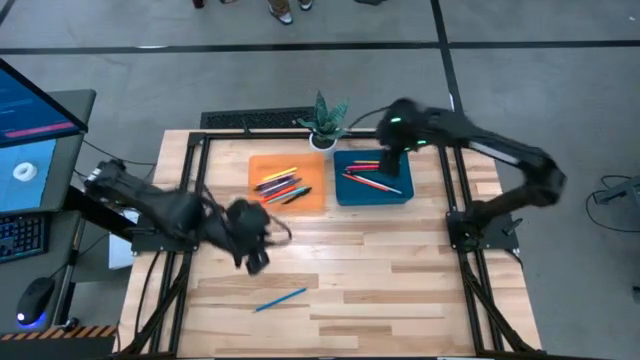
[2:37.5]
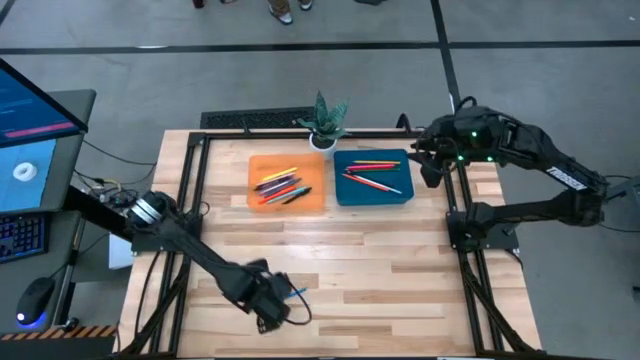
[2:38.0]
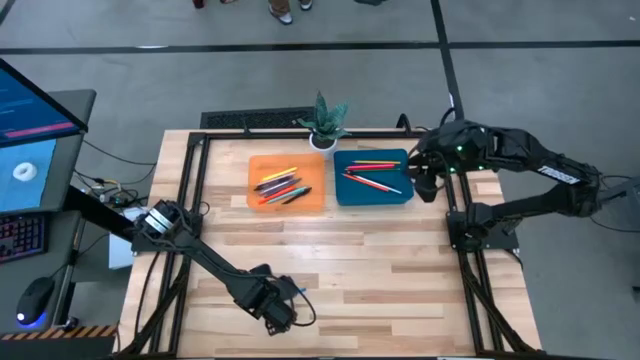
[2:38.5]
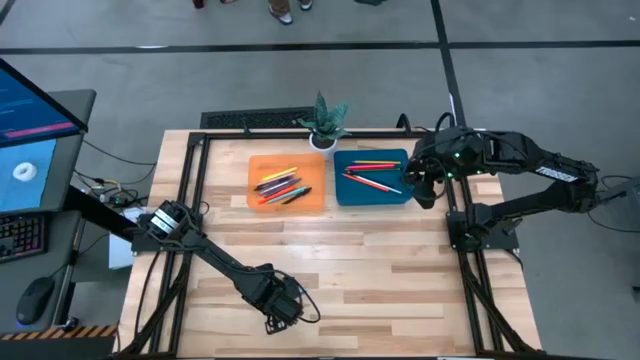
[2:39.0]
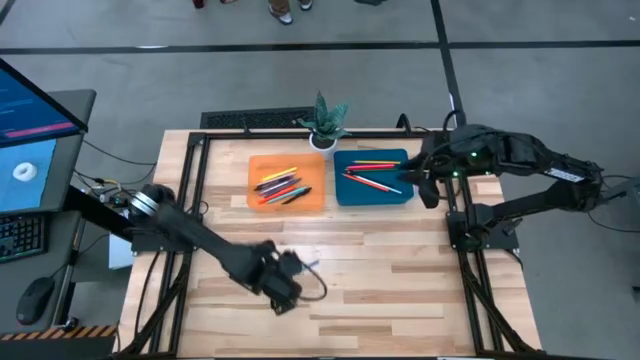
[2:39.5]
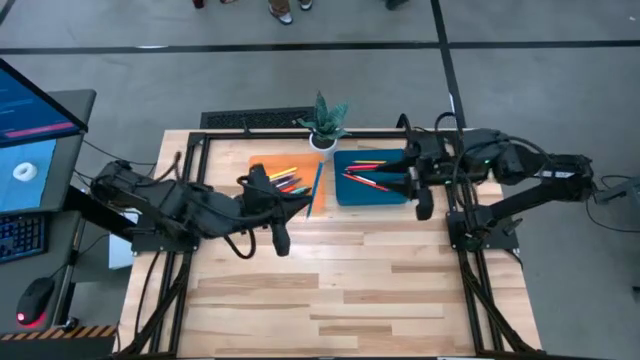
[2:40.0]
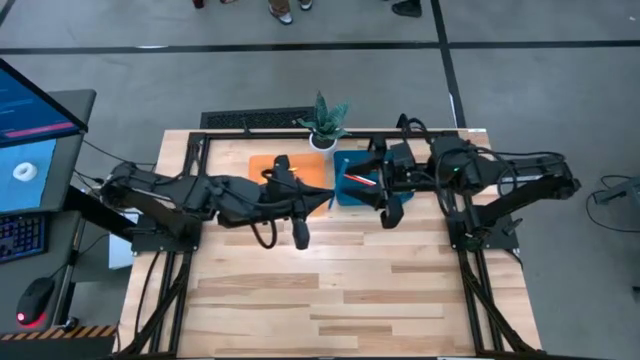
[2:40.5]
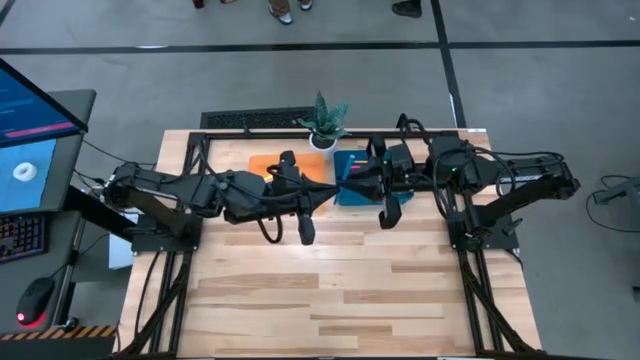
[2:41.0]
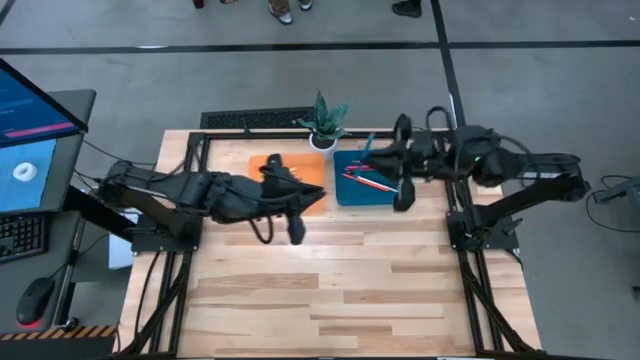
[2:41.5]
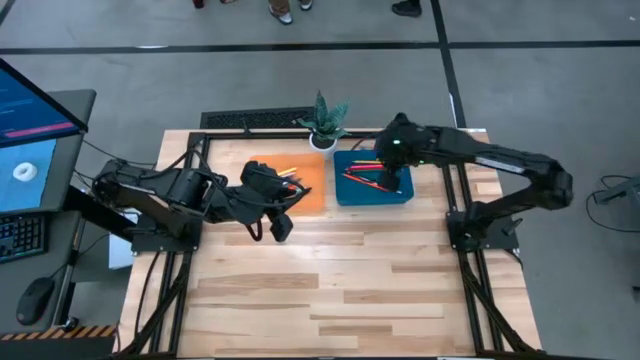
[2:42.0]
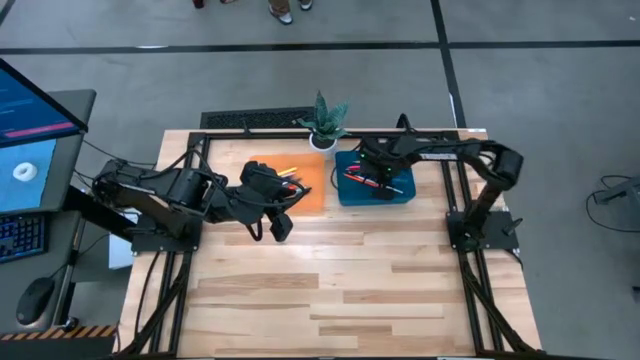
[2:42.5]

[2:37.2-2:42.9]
Task: Sort pens & pencils
Put the blue pencil into the blue bin

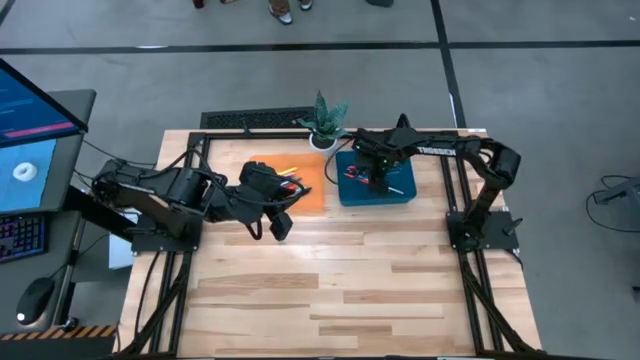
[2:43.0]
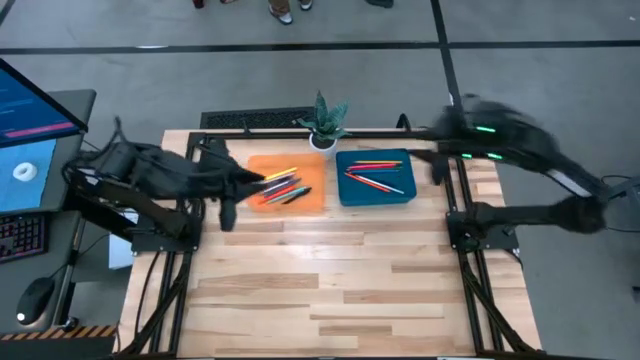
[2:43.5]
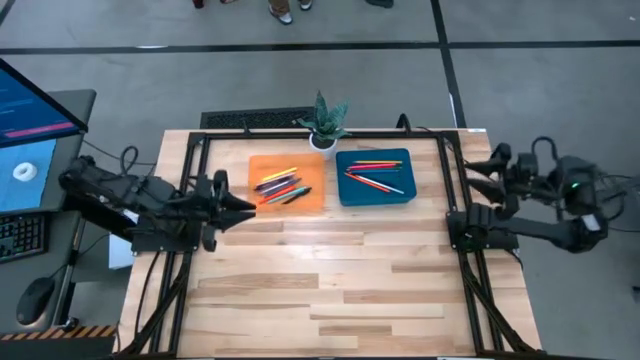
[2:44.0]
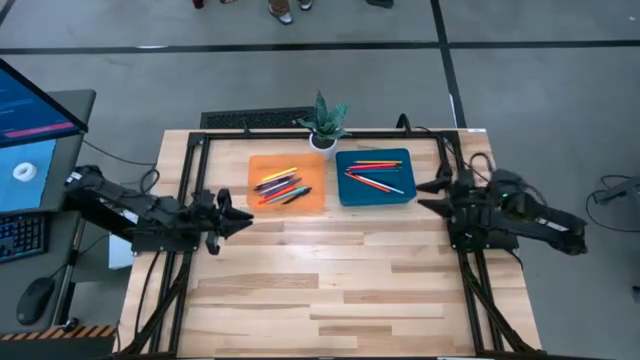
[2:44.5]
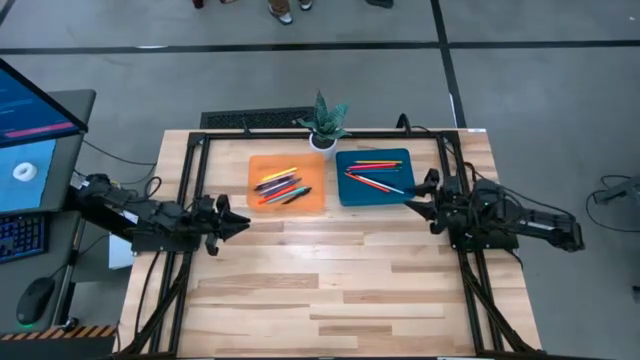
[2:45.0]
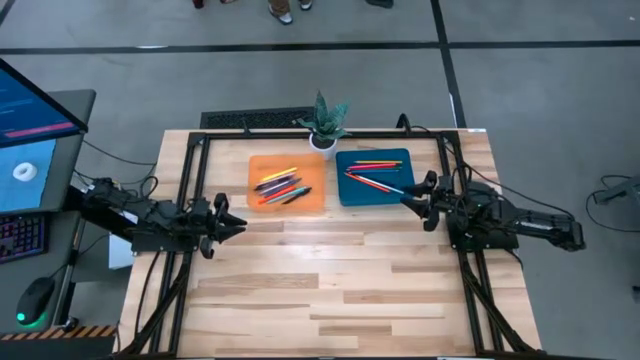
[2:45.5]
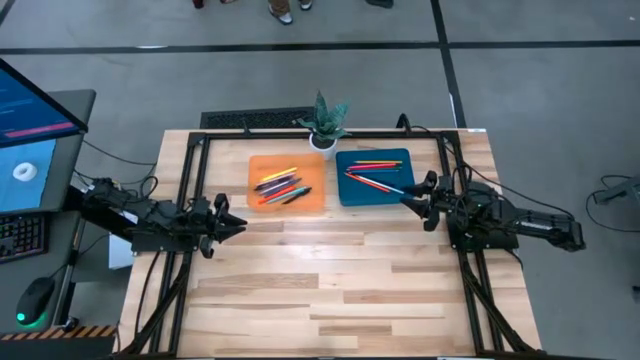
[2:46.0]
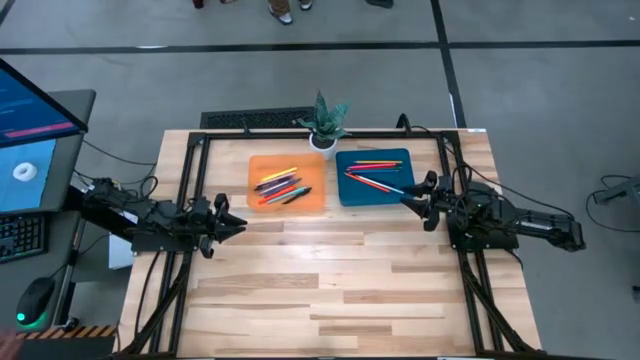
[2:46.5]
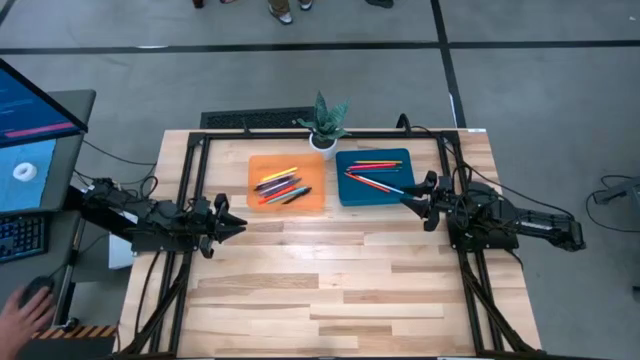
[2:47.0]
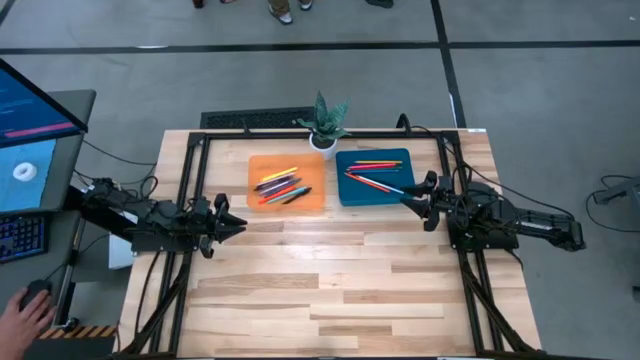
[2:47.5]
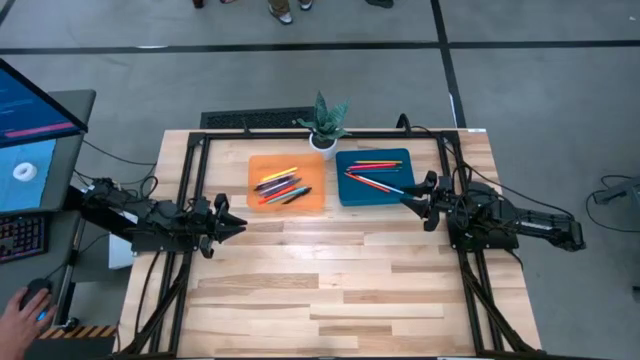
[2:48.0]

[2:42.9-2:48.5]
Return to Home Position

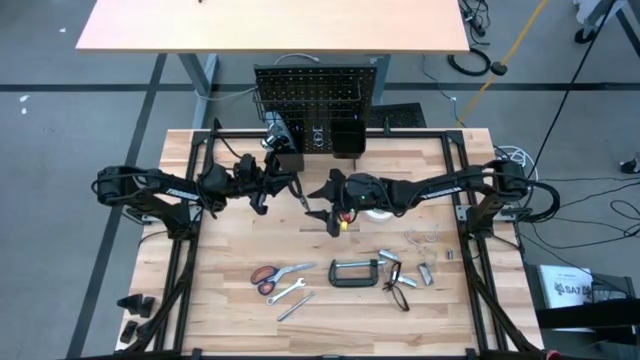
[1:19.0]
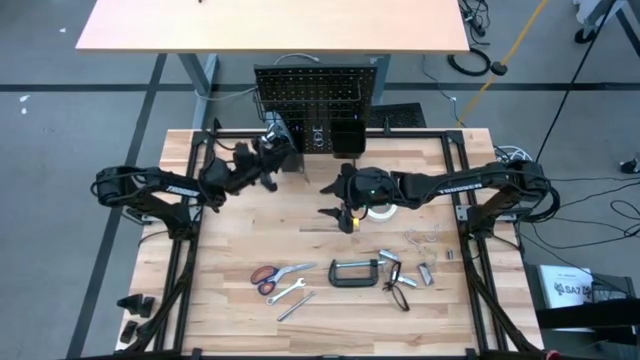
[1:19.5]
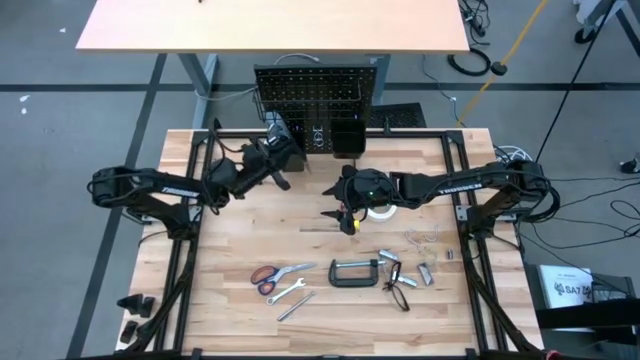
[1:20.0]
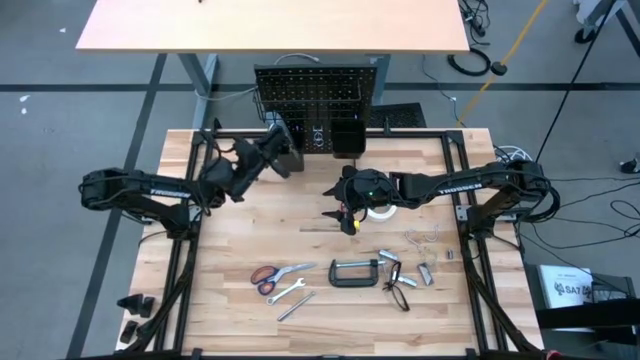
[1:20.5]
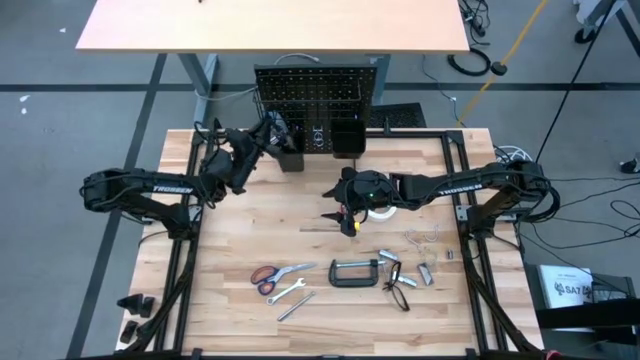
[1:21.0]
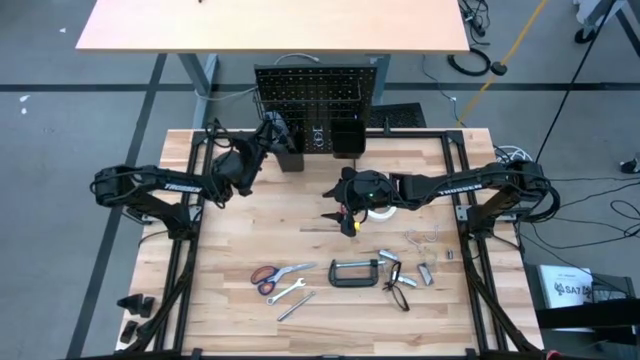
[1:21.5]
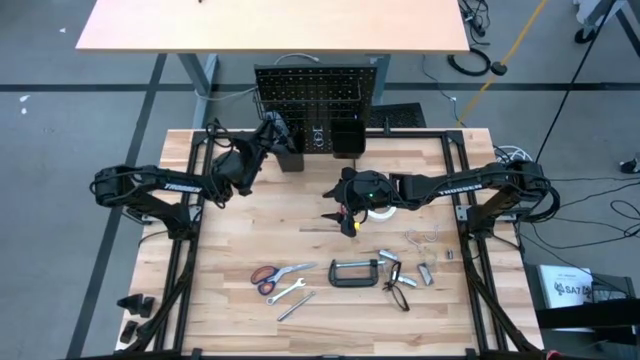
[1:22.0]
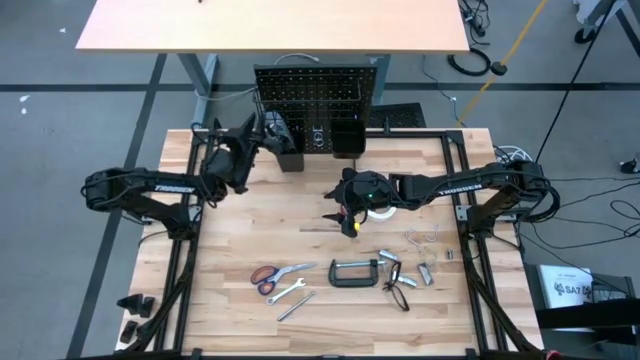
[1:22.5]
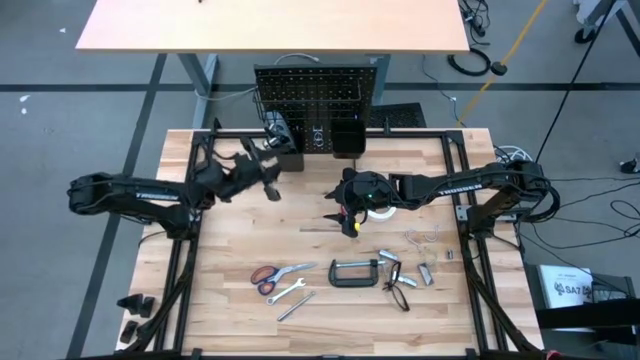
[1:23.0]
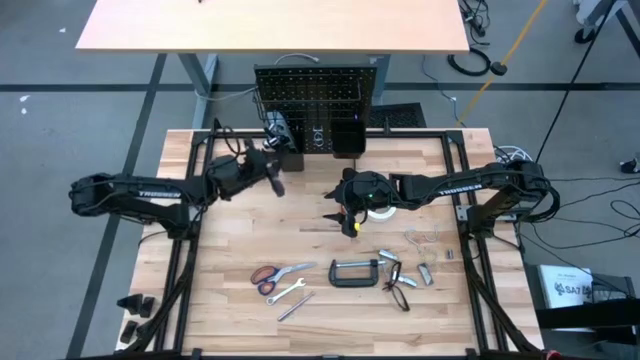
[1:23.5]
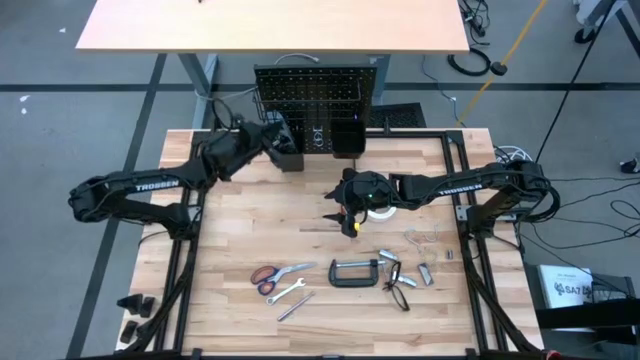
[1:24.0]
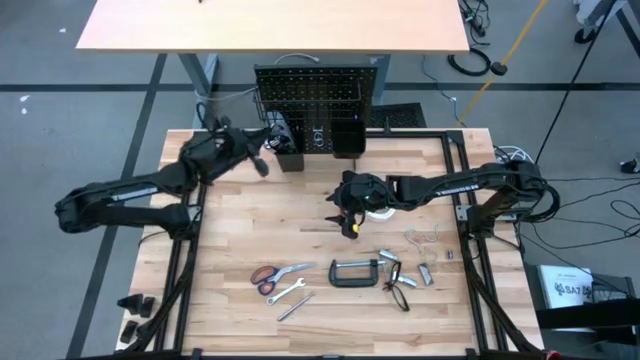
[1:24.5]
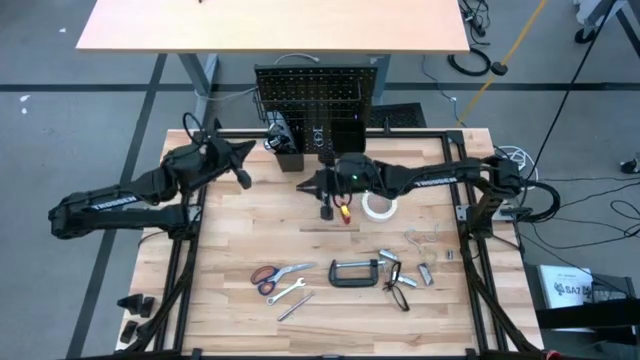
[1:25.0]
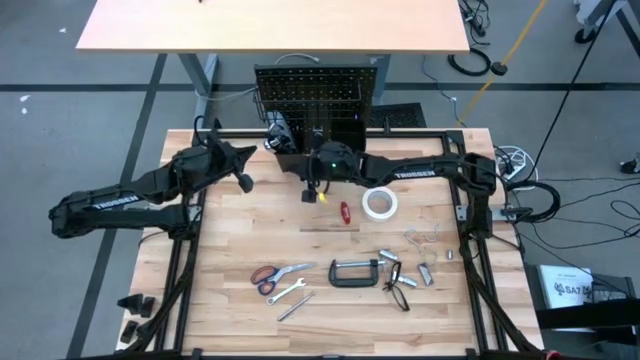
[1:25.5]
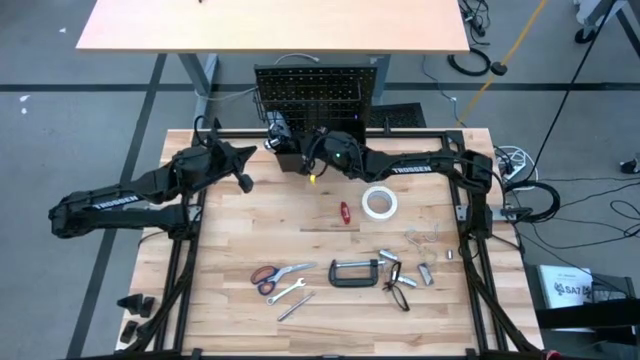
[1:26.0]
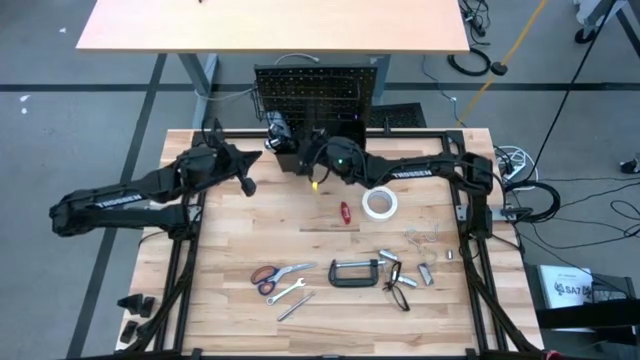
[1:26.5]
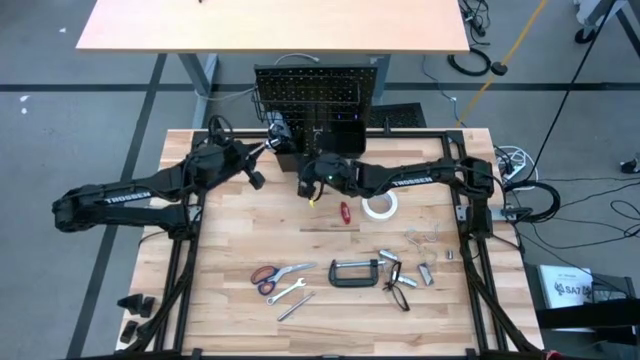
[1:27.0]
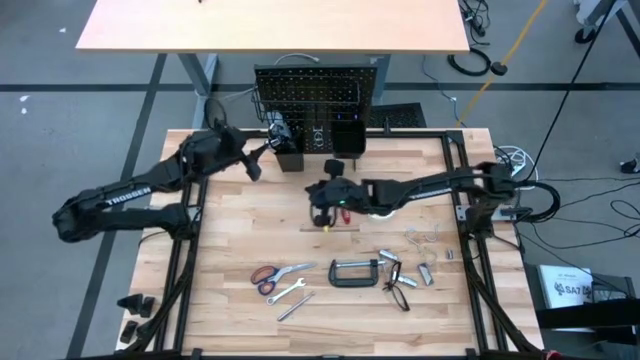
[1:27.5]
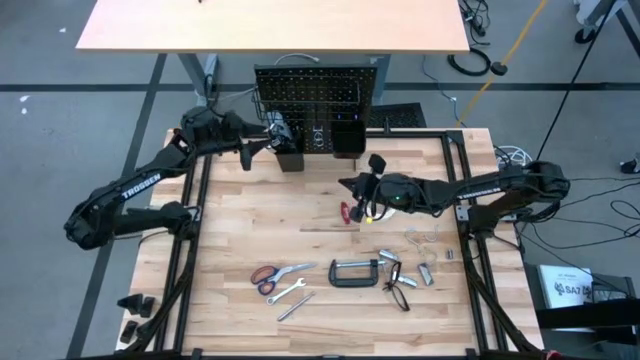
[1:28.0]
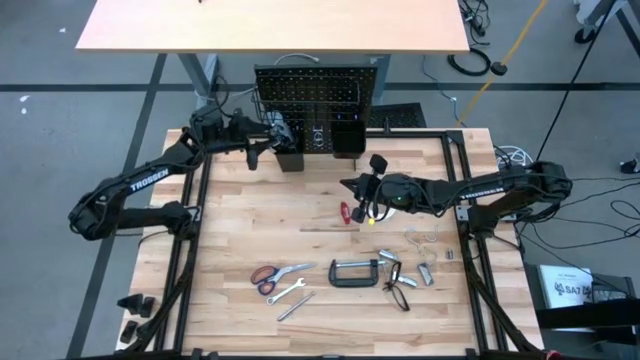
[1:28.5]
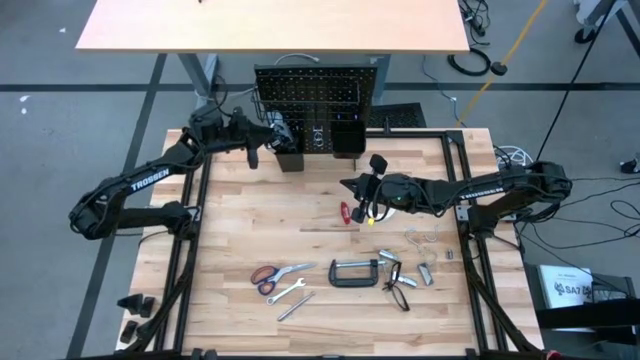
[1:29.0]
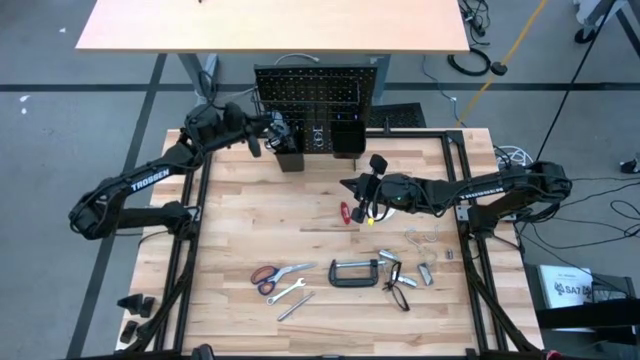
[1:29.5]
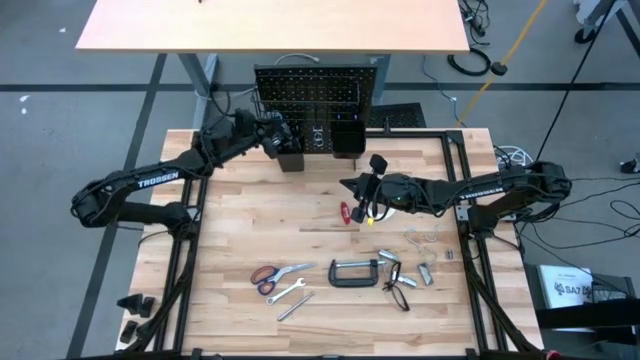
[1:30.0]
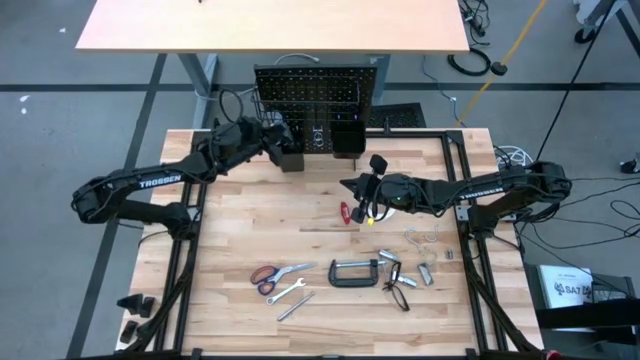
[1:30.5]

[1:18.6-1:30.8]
Task: Hang tools onto peg board
Put the black pliers on the left lower deck of the pegboard
